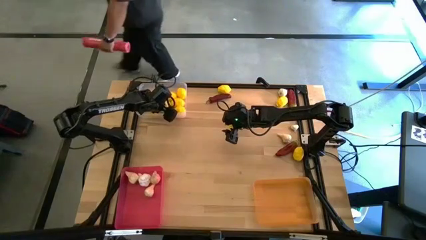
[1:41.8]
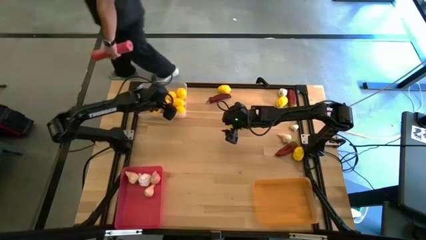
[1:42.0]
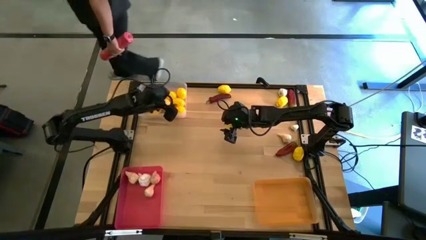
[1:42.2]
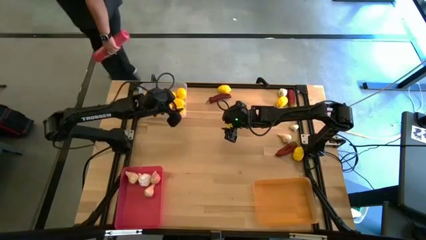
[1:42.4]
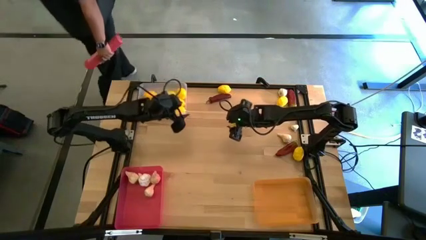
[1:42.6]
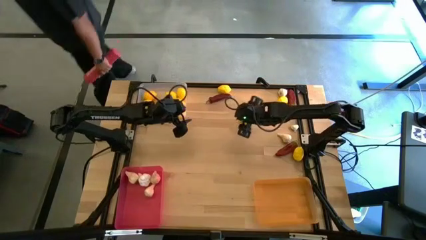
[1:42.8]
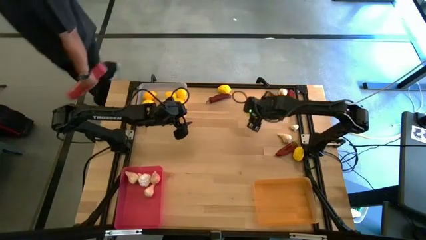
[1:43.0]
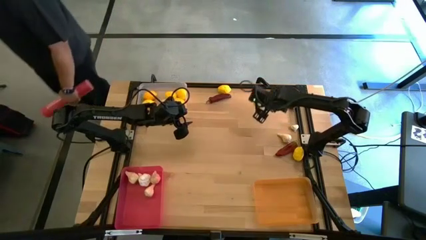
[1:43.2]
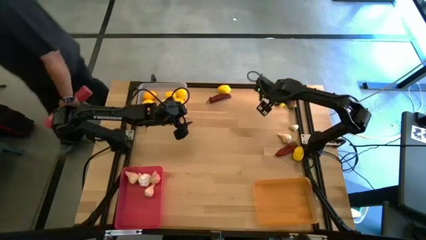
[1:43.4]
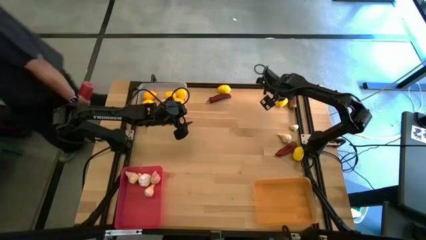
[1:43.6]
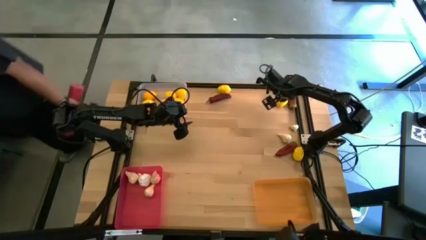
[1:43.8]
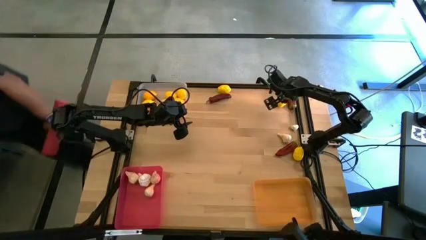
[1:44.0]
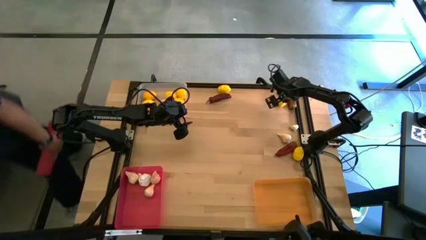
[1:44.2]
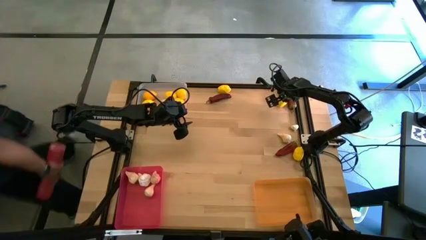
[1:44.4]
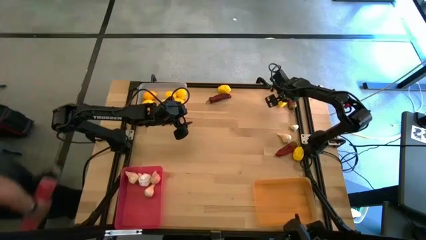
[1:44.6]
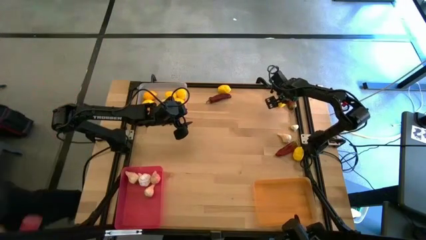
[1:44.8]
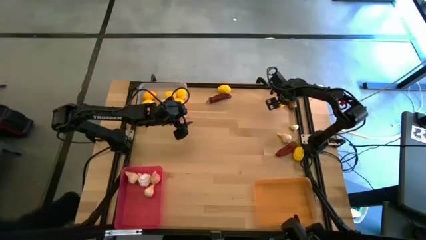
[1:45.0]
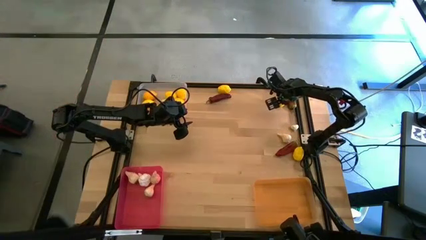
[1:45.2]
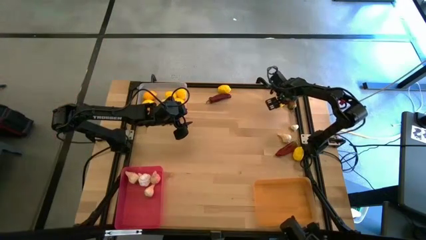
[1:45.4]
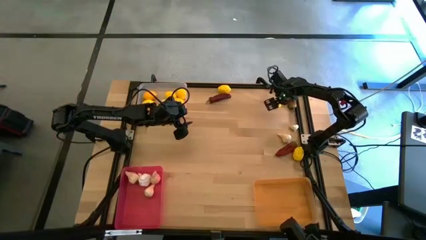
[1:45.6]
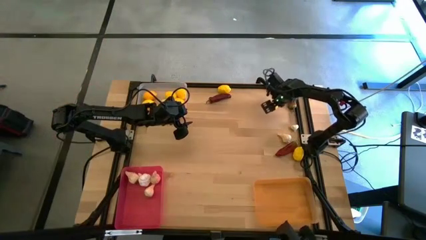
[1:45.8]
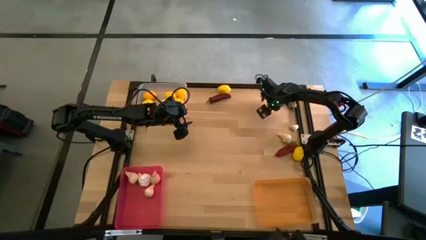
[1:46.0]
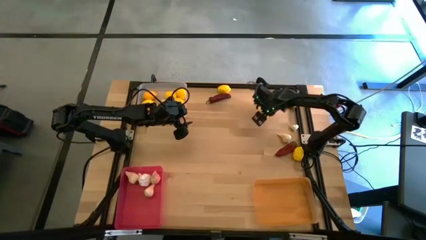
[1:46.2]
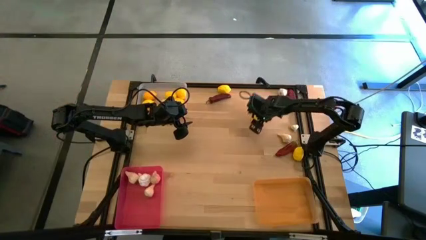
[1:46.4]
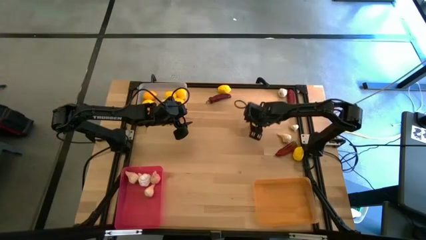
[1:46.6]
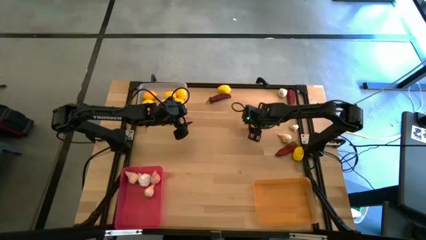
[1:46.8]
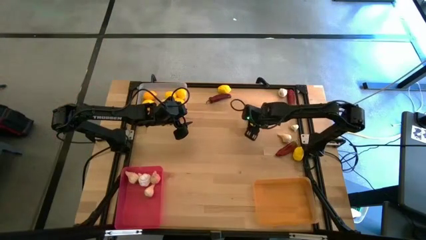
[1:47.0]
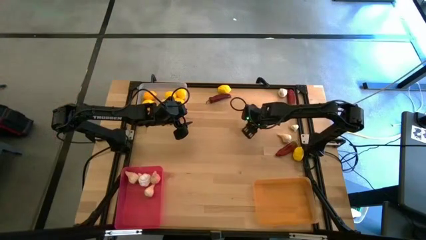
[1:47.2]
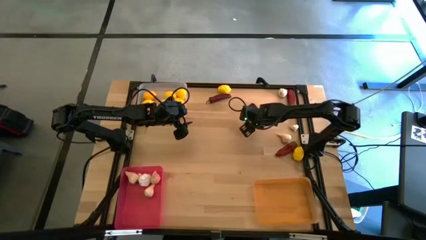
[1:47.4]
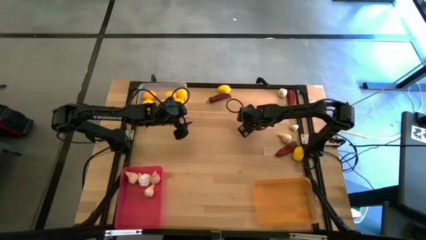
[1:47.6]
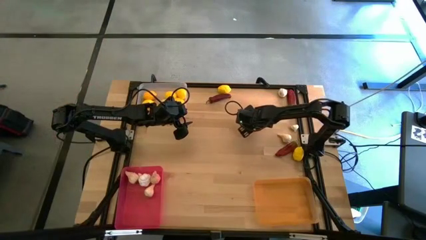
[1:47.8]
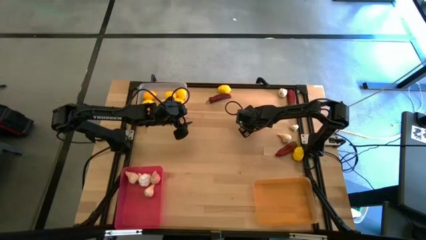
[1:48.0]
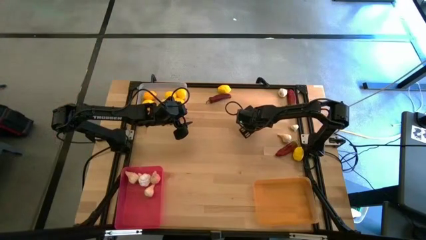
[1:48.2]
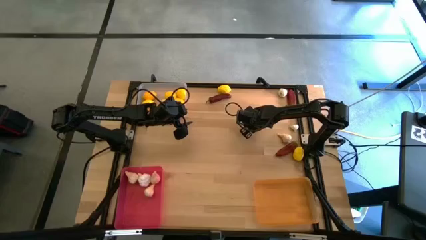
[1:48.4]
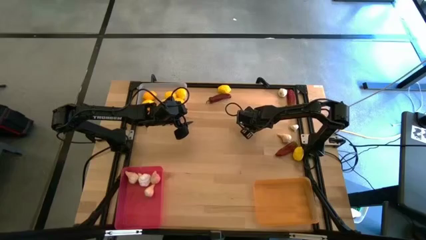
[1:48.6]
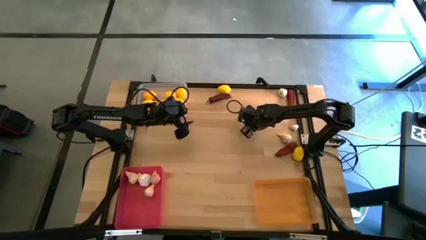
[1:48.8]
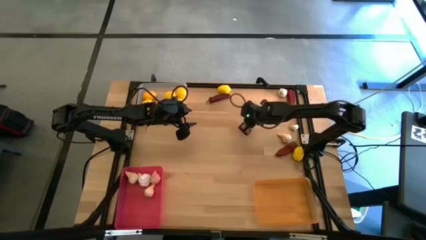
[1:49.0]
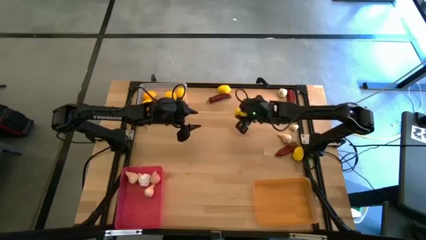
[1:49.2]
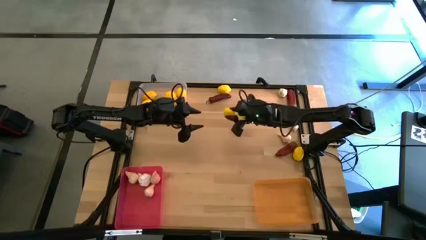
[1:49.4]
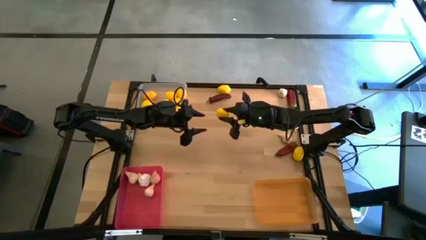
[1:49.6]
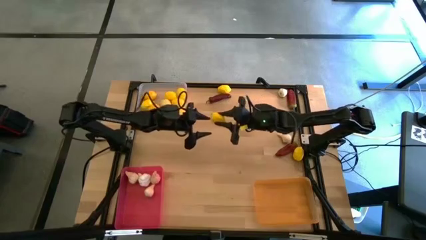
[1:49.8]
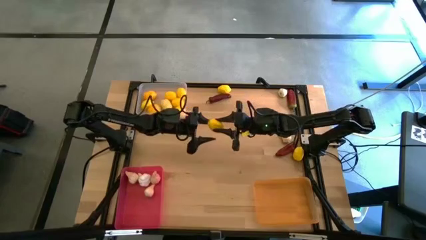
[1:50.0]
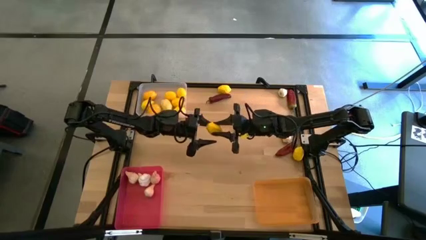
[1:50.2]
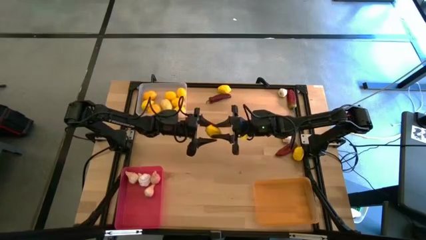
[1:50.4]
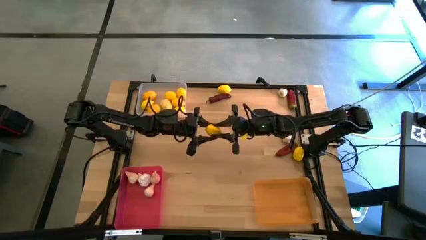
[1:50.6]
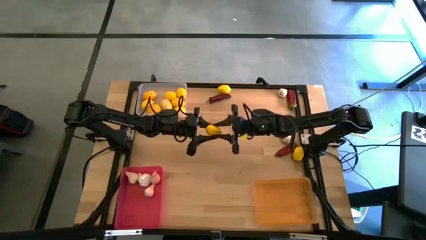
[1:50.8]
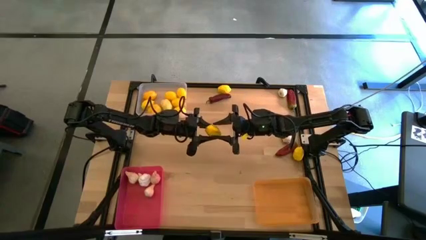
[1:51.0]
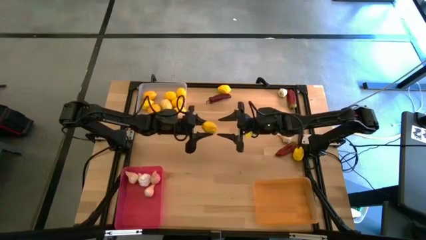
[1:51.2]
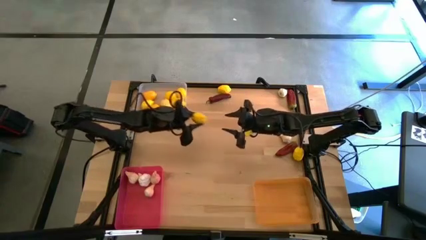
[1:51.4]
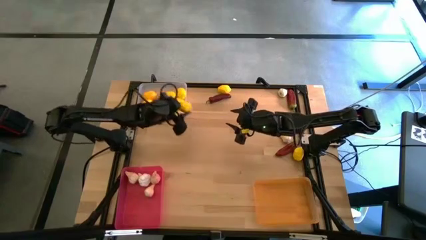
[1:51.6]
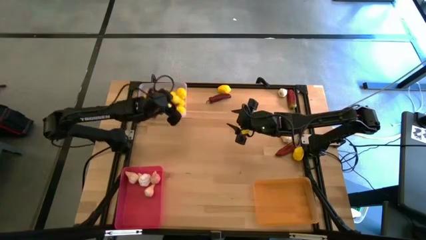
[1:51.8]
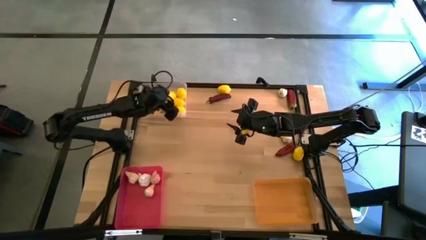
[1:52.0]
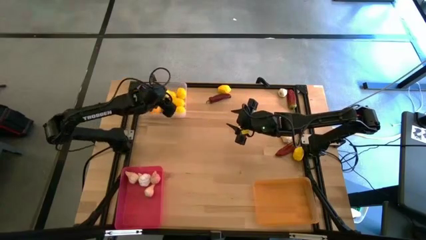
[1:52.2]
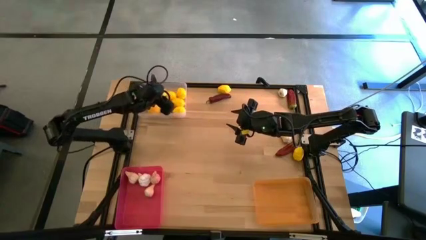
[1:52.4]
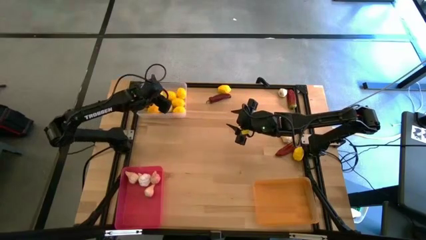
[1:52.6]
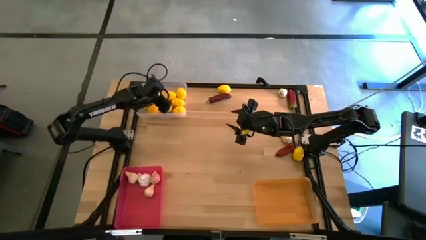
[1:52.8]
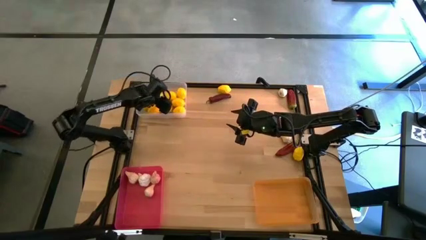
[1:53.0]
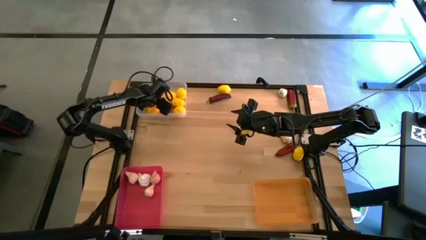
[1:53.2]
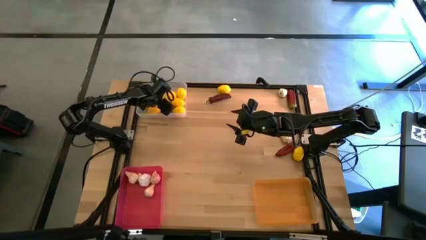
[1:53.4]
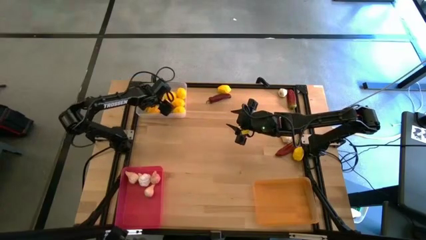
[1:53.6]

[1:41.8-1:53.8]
Task: Sort produce into baskets
Put the yellow lemon into the left white bin

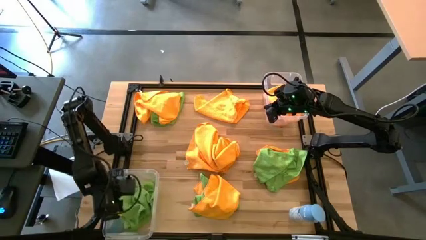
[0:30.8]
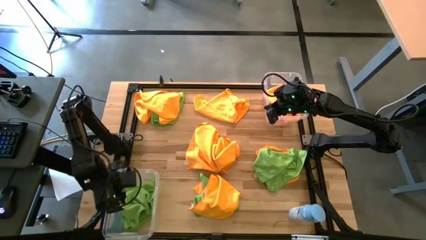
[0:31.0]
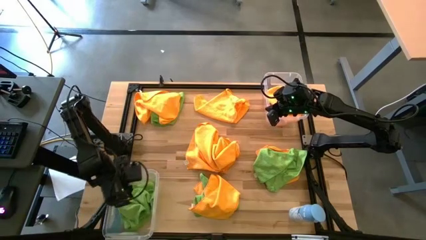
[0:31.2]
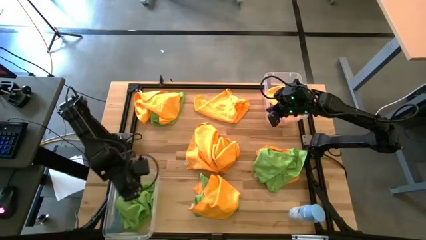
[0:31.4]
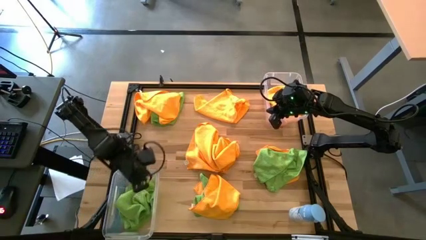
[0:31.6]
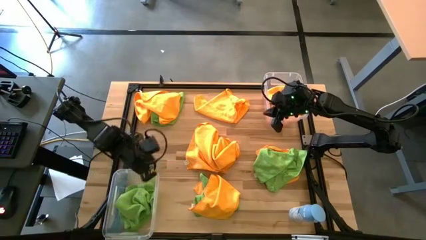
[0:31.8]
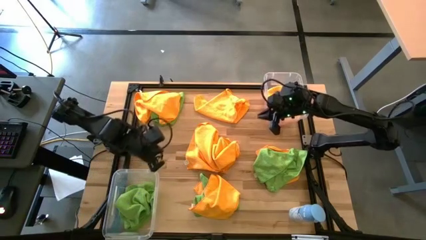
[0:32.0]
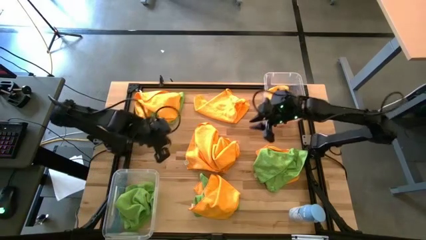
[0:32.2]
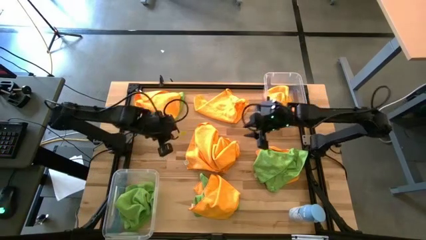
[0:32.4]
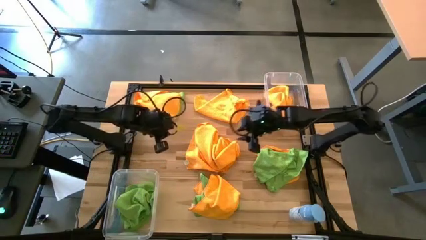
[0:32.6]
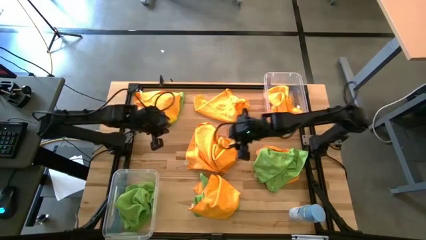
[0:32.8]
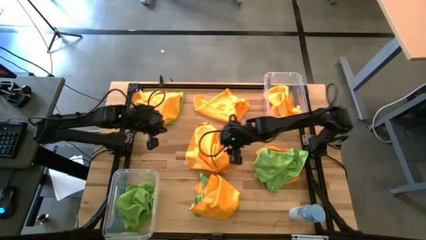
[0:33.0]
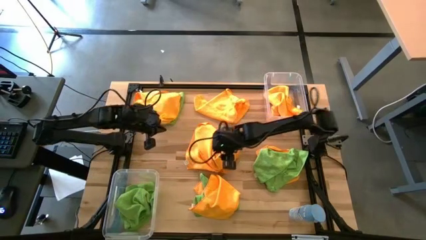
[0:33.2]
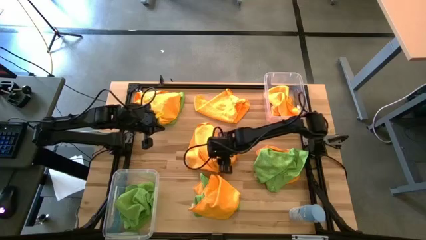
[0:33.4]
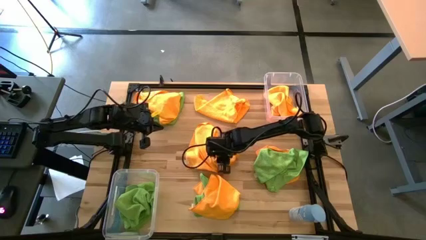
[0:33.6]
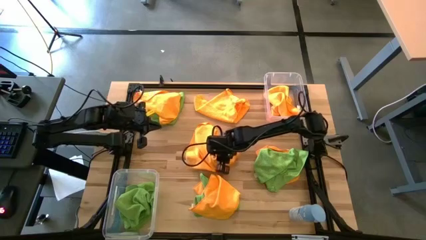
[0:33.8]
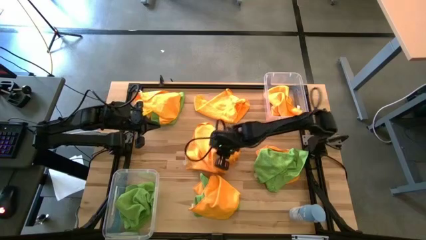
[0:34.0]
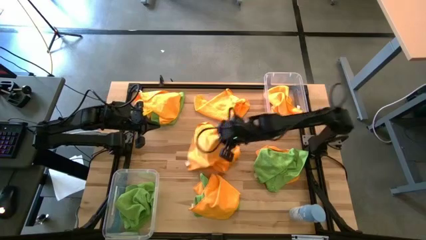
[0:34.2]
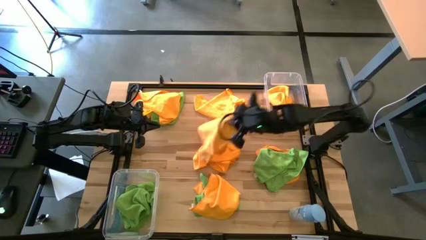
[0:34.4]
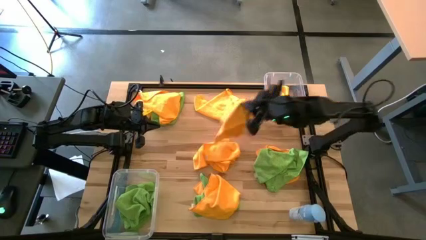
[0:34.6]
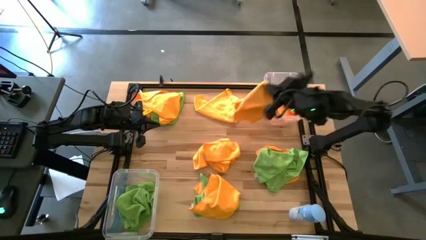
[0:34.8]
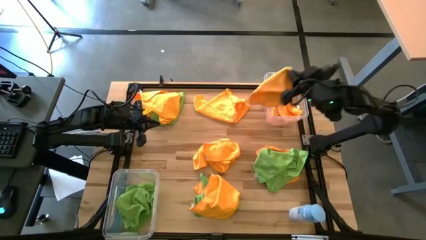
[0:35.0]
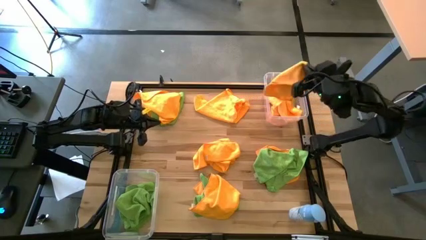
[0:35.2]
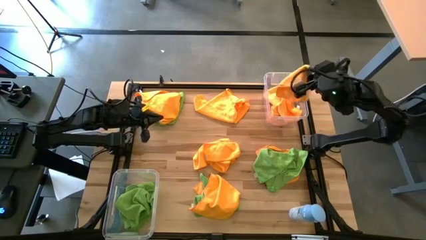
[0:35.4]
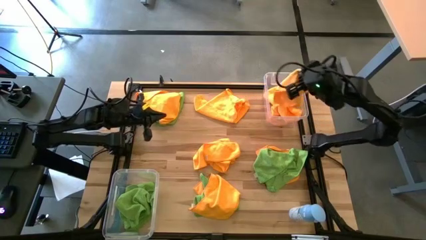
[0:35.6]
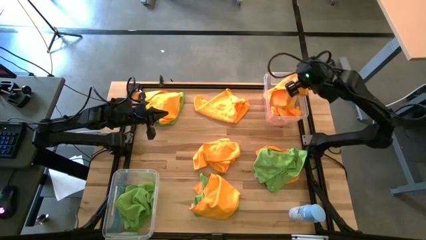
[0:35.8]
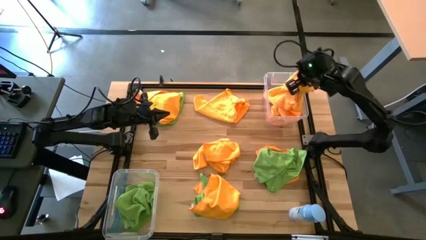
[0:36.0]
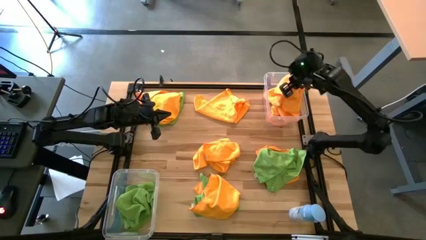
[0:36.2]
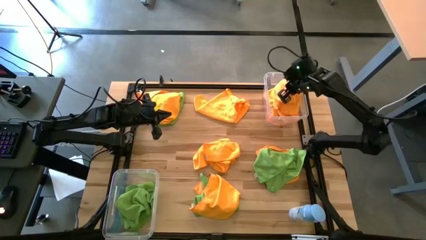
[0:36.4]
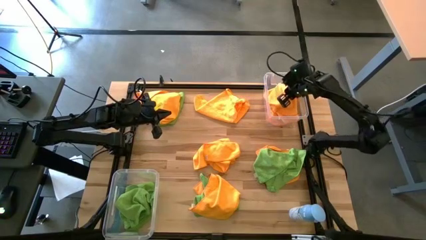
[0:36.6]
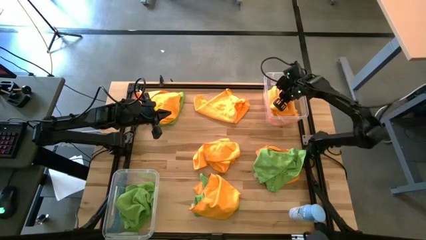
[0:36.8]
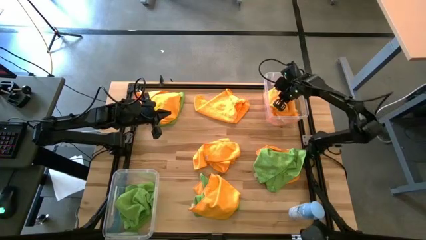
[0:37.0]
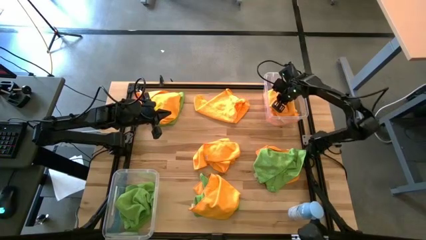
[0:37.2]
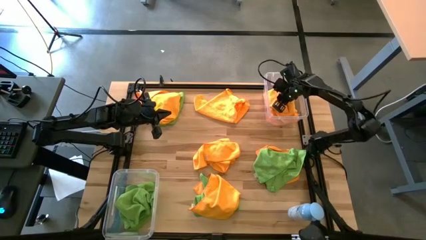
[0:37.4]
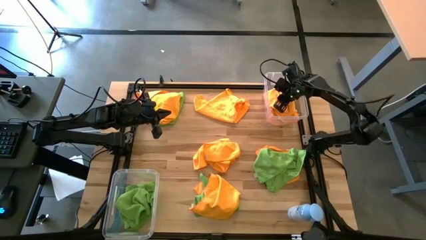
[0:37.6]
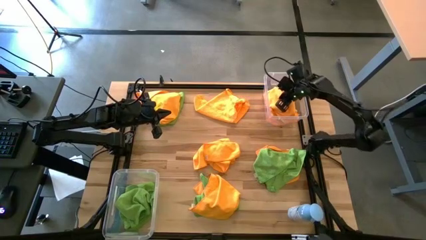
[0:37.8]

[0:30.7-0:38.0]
Task: Sort microfiber towel by color & place in baskets
Put the orange microfiber towel into the top transparent bin
